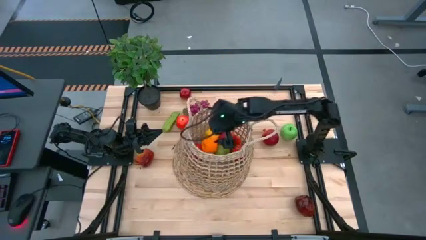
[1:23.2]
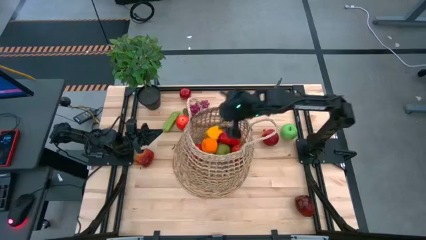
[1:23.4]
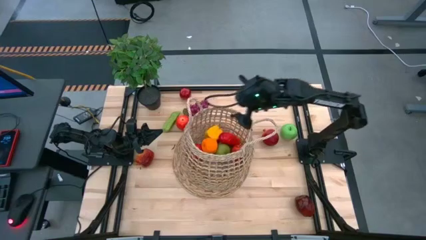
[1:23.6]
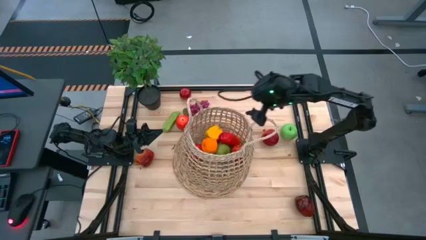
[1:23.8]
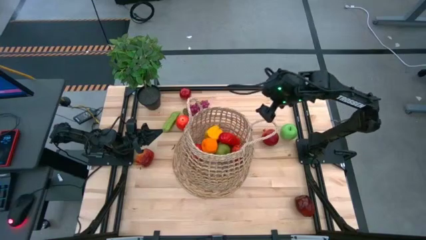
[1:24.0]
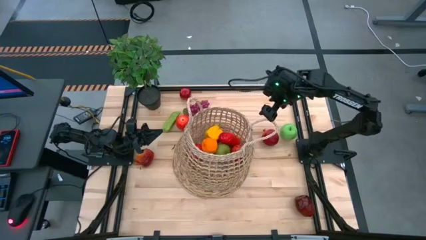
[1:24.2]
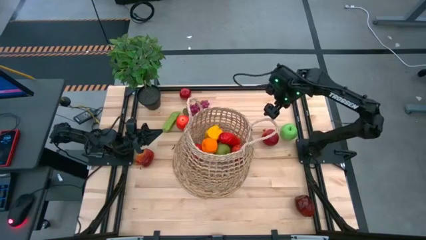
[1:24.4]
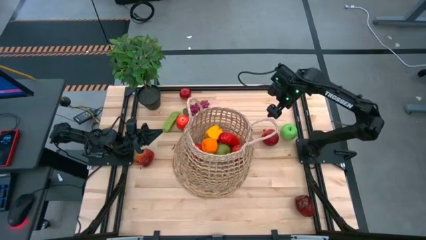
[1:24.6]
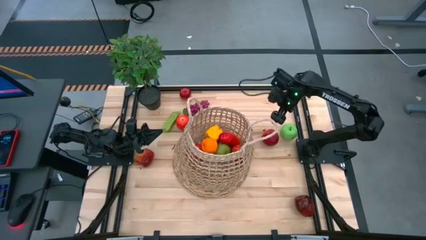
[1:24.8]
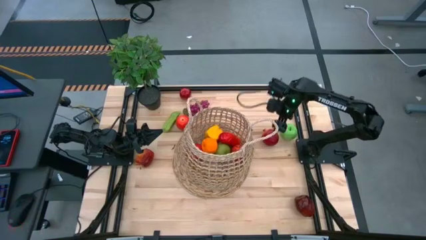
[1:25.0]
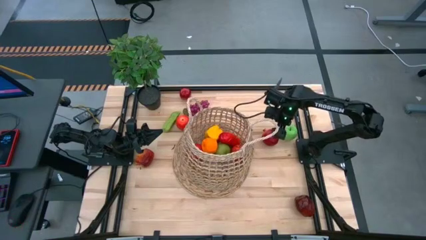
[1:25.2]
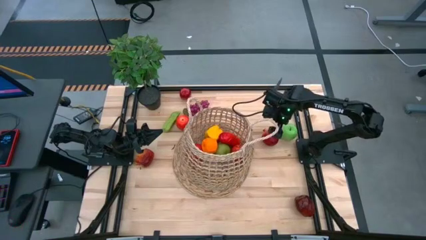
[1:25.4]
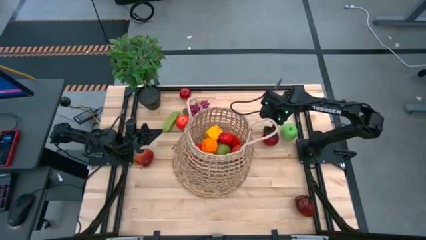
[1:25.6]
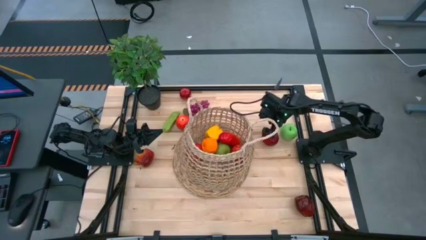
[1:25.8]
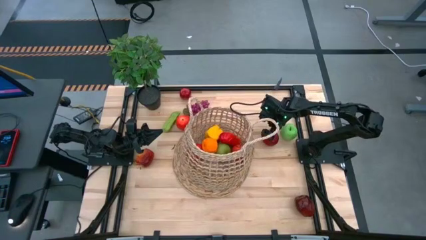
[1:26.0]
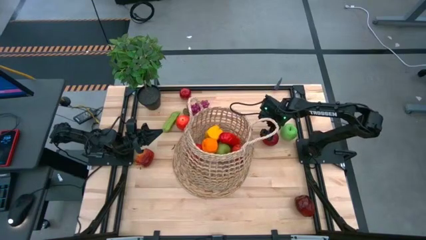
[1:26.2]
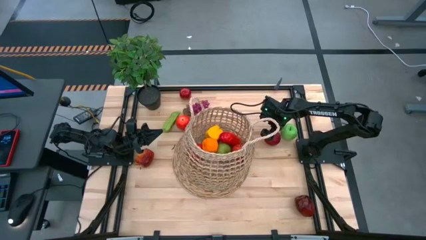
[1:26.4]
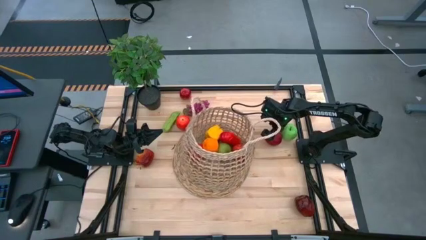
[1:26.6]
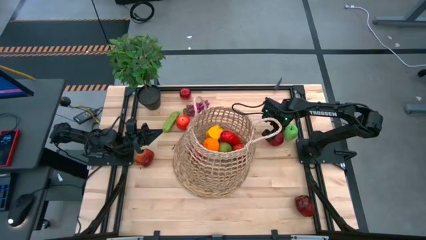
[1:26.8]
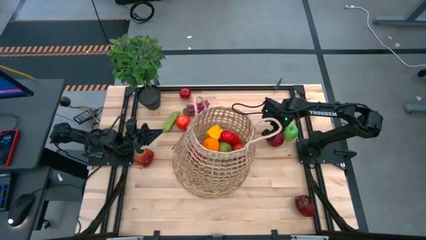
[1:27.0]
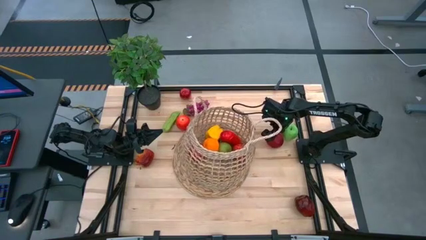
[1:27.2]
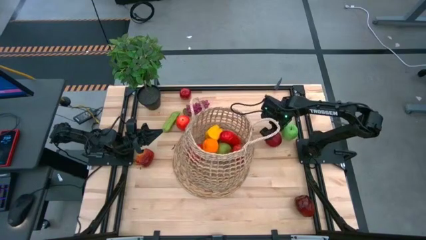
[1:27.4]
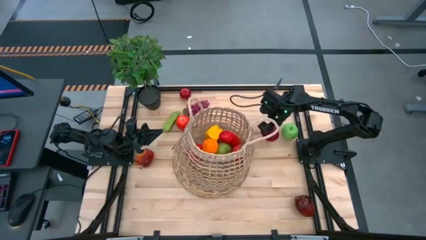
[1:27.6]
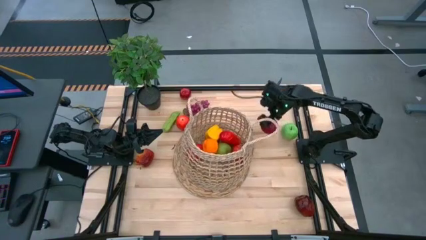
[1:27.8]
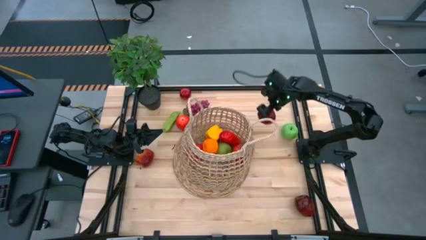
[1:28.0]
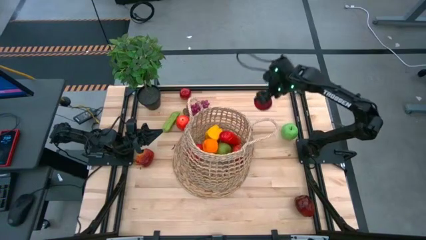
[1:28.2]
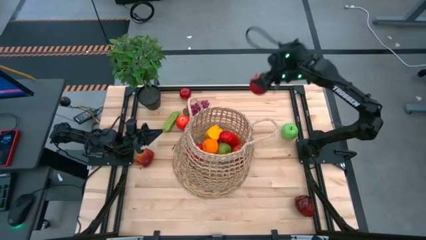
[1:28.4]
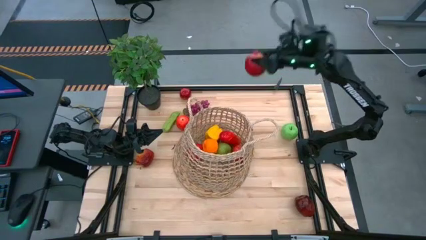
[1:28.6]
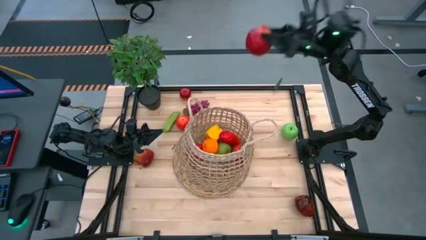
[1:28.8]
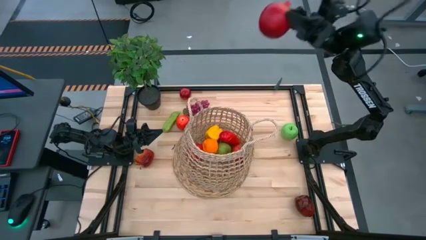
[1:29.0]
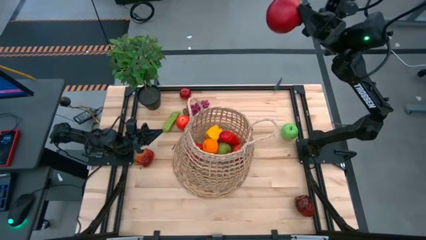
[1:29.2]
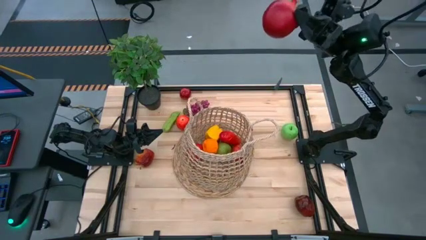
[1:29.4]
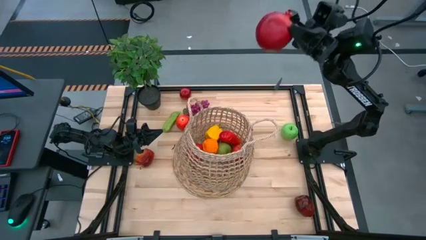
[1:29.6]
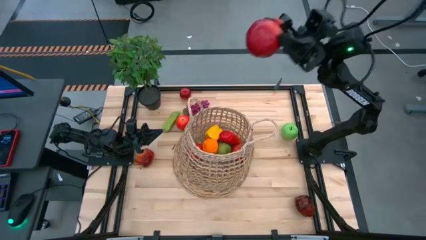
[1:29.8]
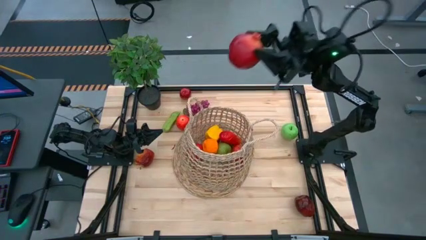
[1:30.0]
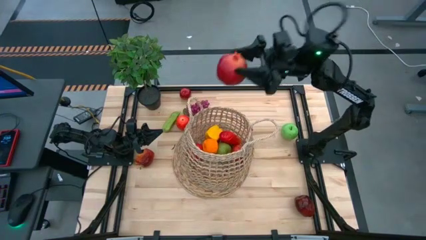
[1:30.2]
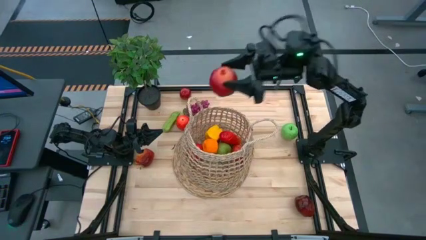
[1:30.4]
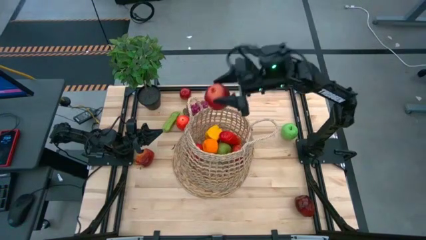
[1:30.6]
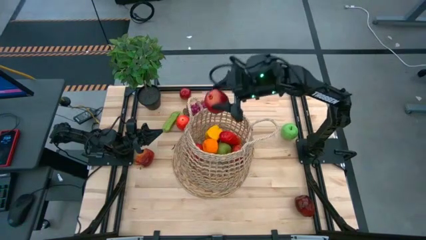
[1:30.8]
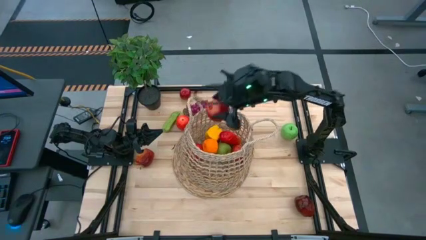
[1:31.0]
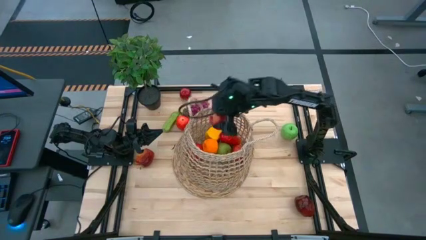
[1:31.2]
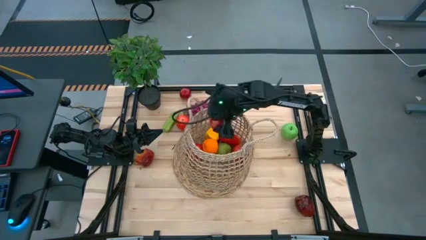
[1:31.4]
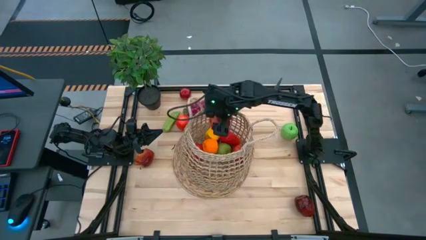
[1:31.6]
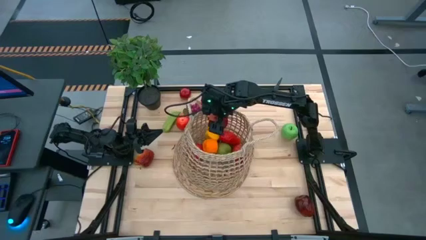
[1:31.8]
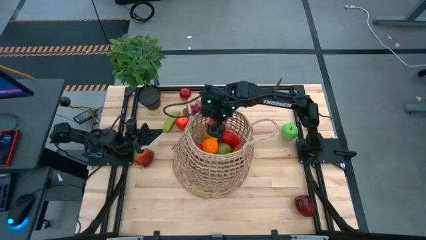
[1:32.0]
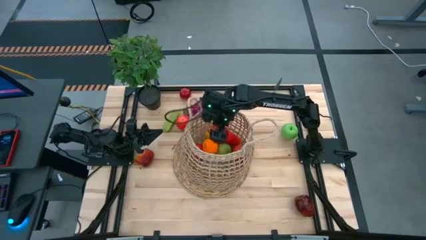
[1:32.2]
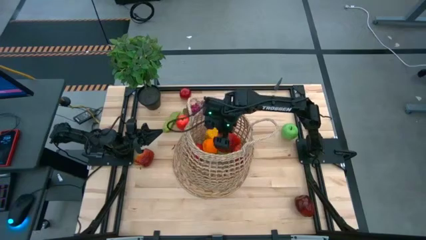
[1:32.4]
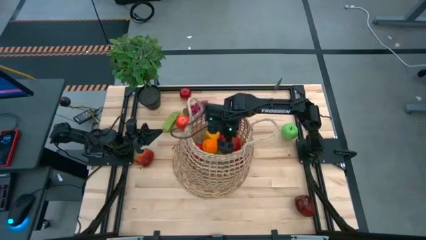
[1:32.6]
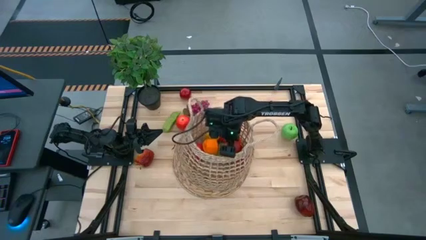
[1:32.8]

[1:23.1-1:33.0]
Task: Build produce basket
Put the red pomegranate into the brown basket

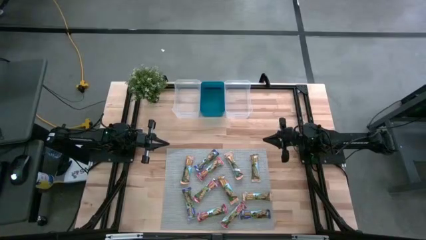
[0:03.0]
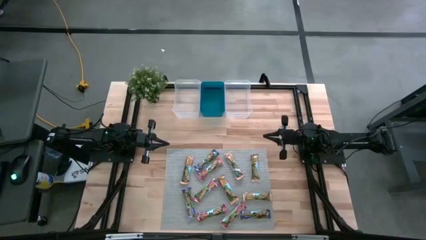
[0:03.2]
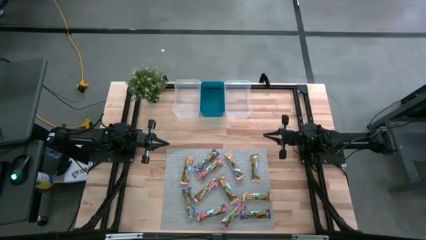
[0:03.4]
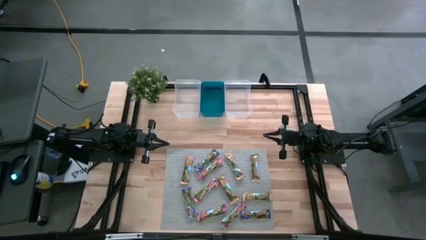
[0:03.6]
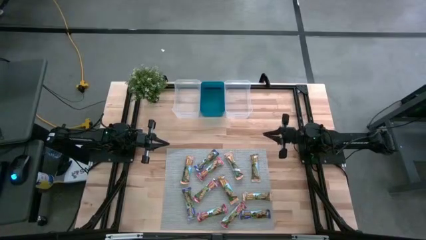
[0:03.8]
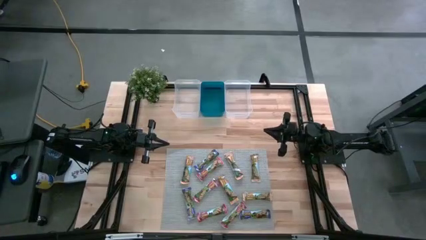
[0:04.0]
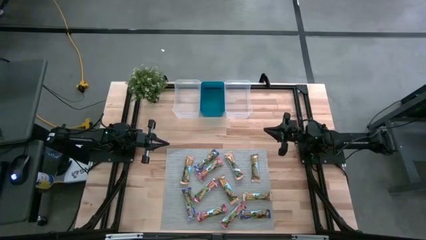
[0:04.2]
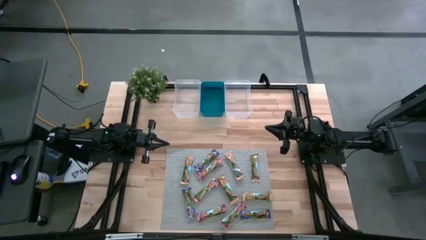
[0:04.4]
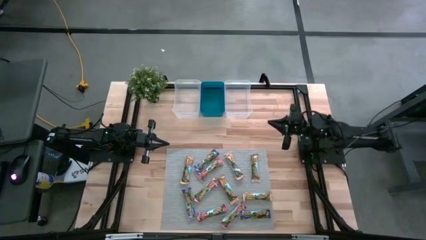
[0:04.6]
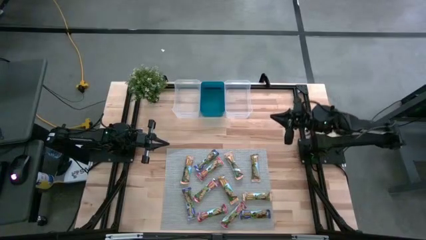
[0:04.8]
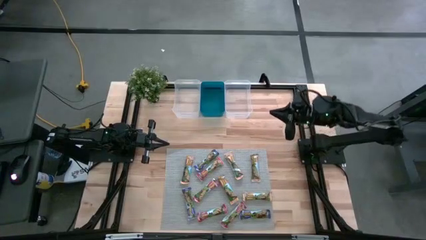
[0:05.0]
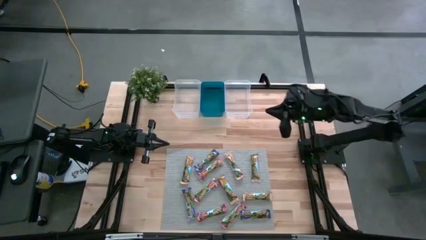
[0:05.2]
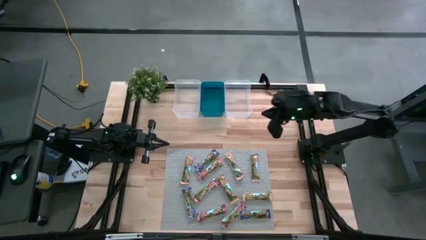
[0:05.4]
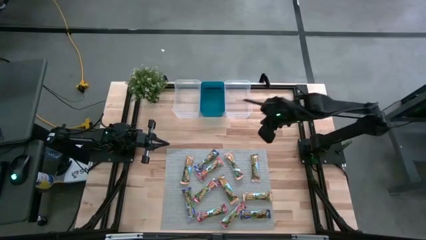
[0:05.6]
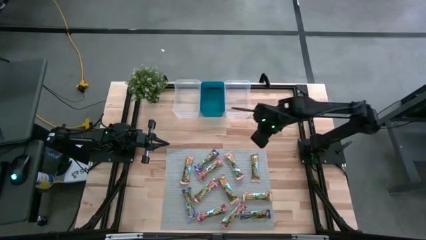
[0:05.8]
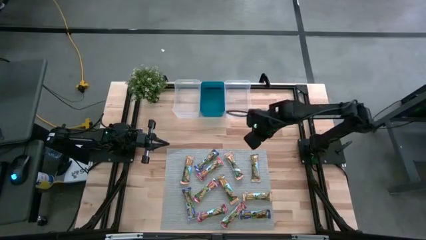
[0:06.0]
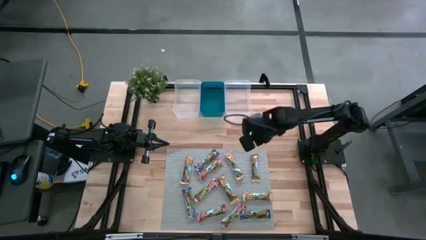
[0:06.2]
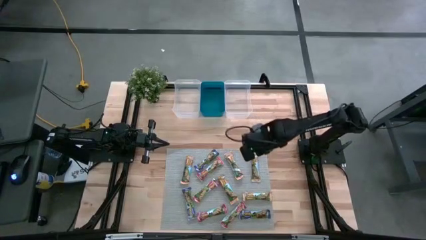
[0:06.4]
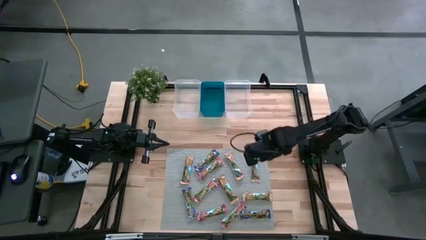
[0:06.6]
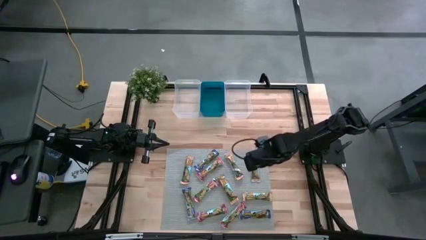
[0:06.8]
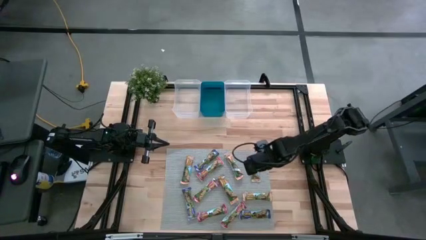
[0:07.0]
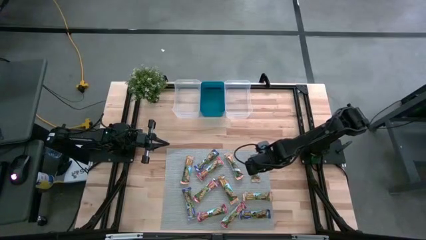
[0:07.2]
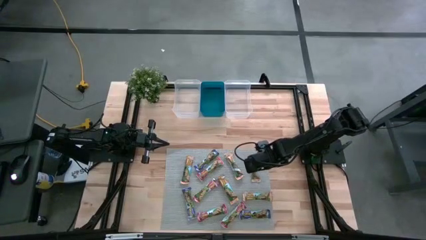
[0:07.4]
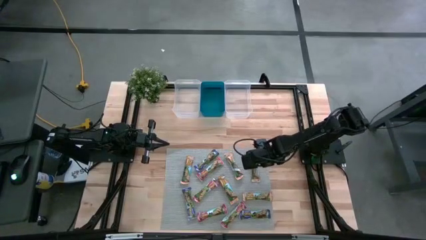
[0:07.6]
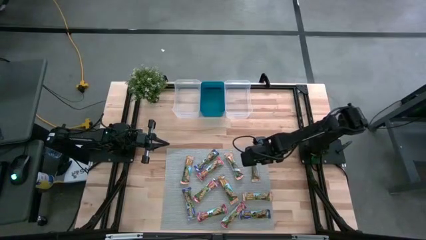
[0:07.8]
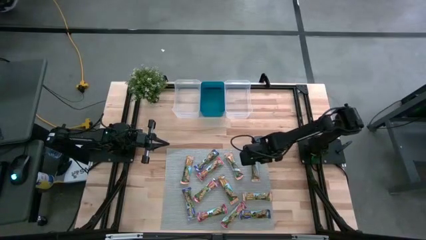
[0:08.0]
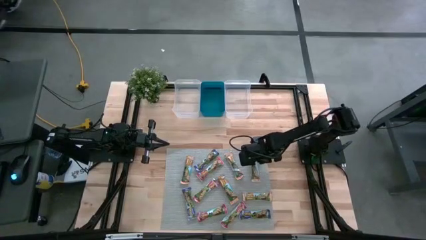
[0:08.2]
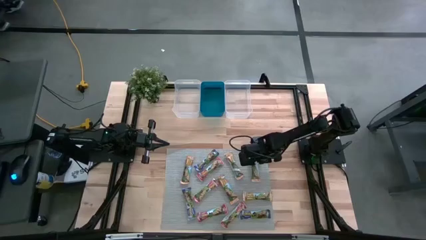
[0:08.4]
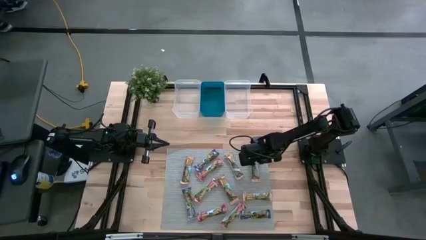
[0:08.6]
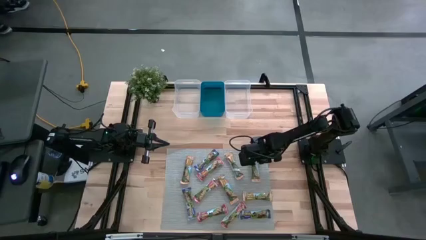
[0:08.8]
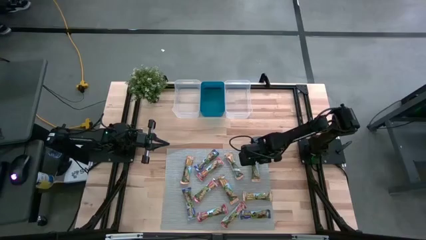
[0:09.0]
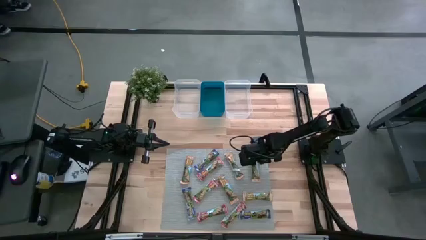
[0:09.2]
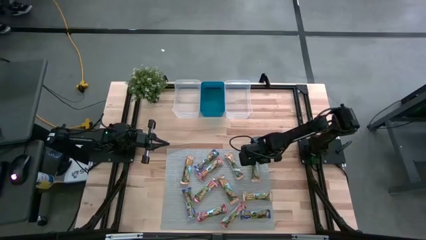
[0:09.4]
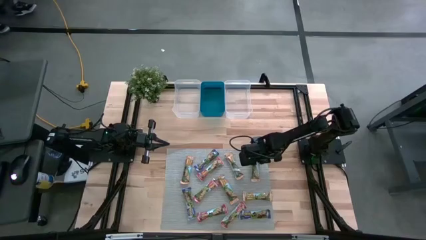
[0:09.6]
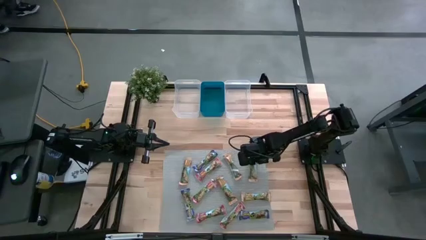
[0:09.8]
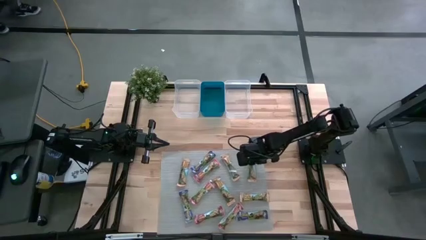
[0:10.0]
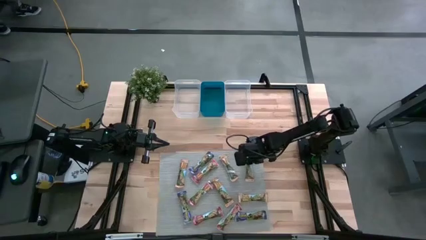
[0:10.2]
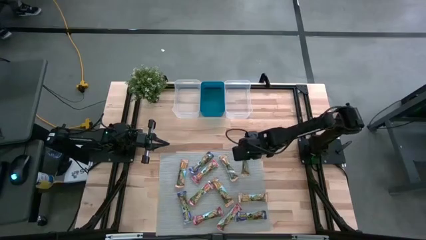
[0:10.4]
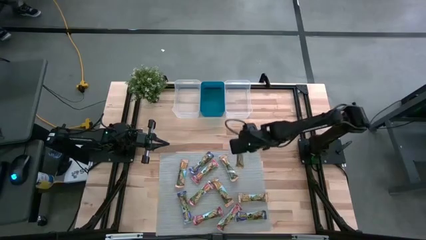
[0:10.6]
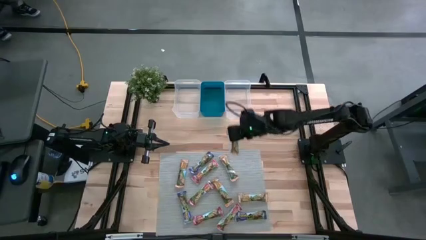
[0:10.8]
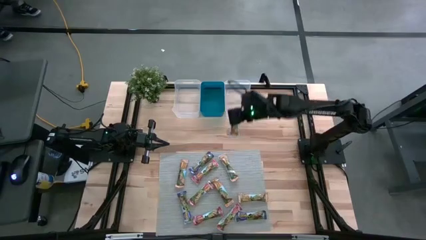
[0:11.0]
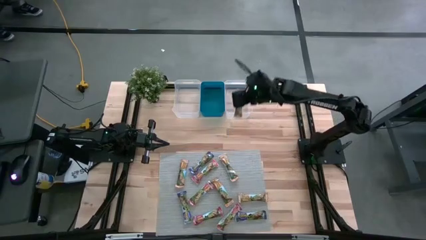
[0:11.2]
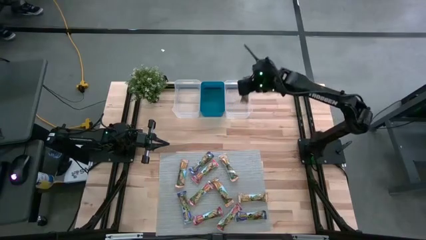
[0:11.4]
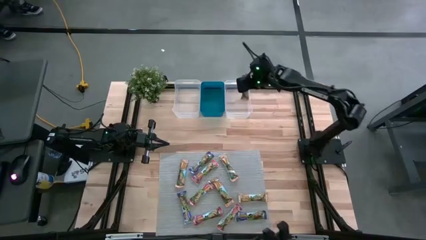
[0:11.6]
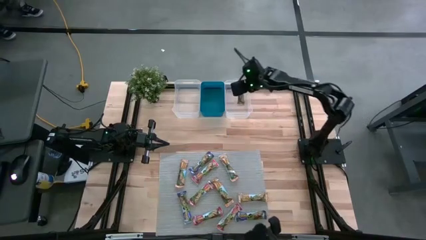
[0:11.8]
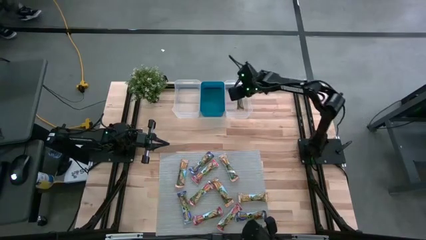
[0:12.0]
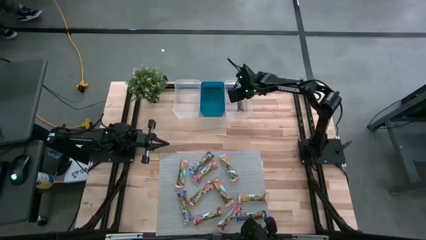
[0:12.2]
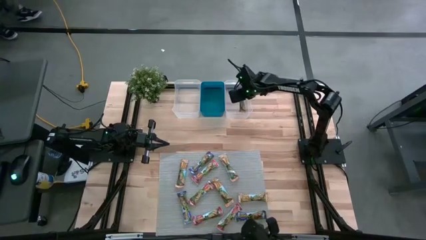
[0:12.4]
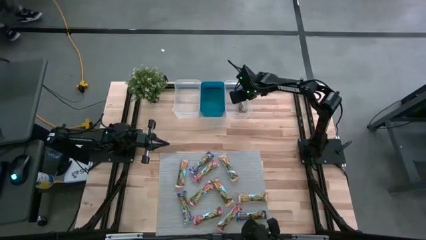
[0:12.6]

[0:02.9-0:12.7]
Task: Pick and place Granola Bars by type
Put the orange granola bar into the right transparent bin
